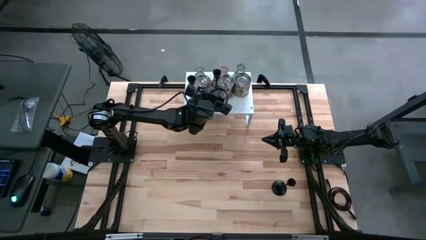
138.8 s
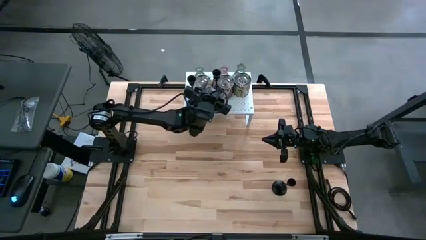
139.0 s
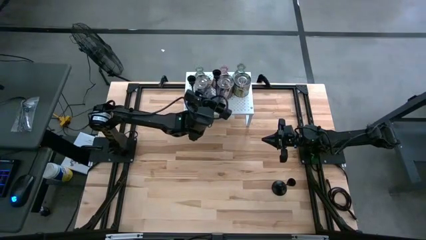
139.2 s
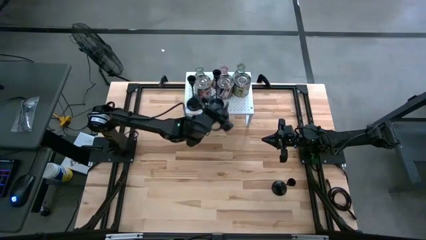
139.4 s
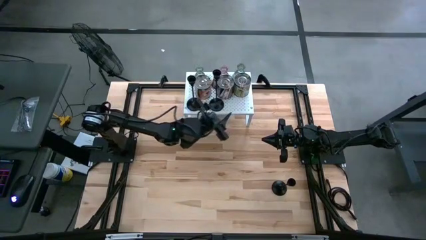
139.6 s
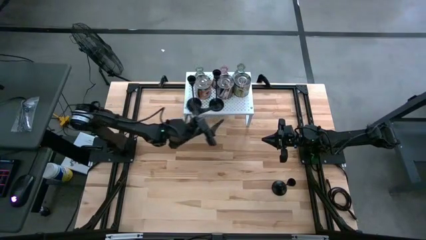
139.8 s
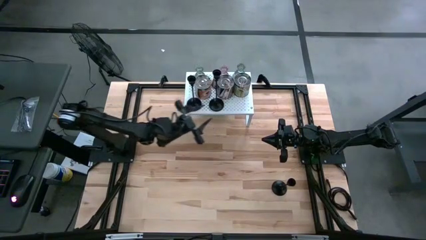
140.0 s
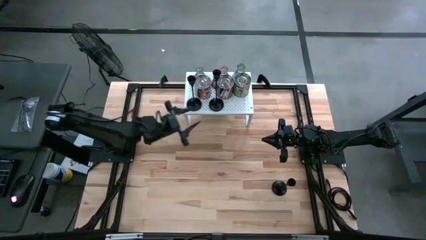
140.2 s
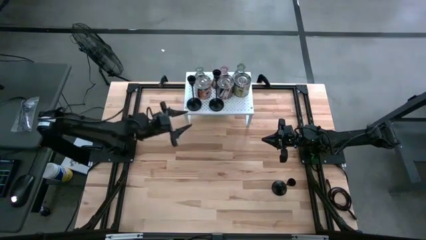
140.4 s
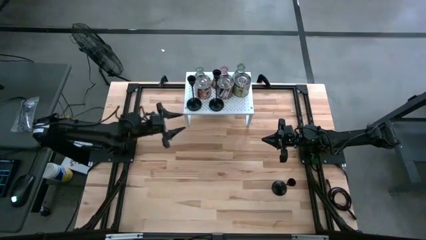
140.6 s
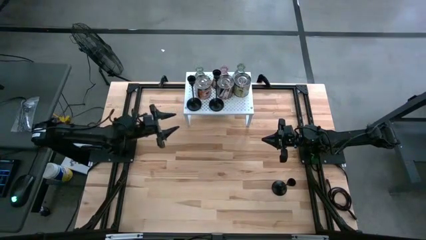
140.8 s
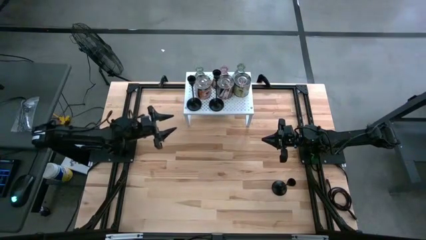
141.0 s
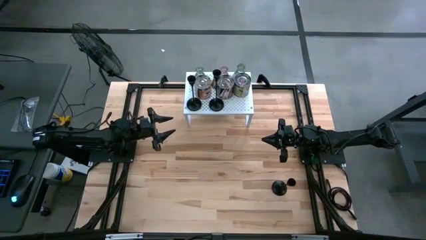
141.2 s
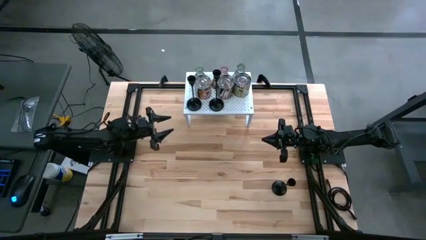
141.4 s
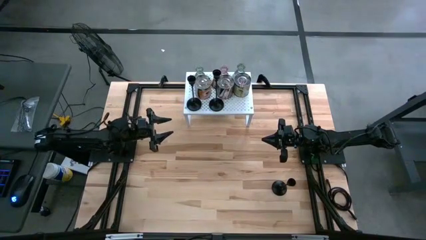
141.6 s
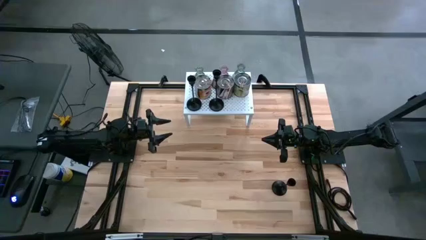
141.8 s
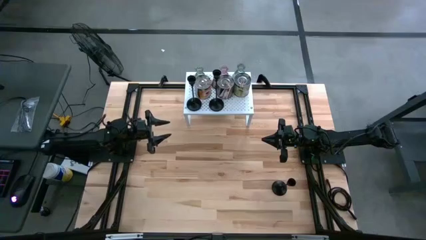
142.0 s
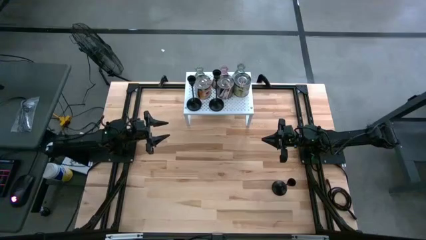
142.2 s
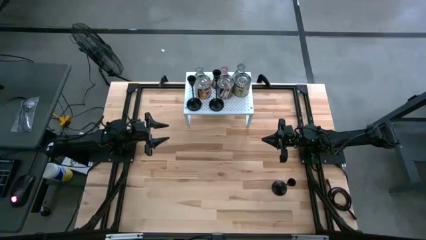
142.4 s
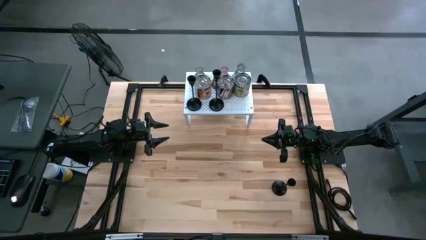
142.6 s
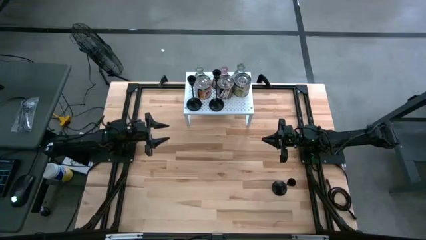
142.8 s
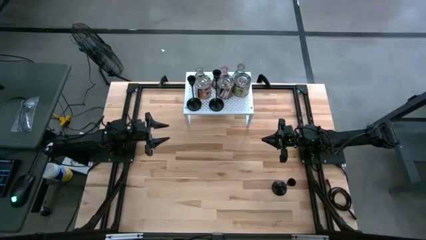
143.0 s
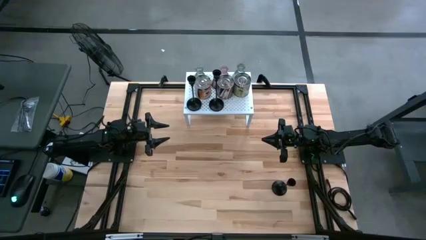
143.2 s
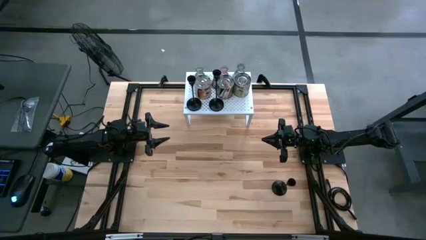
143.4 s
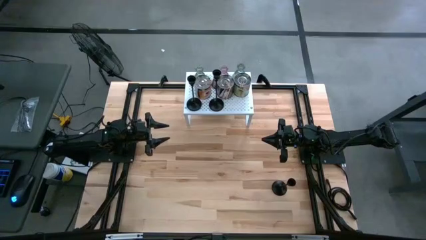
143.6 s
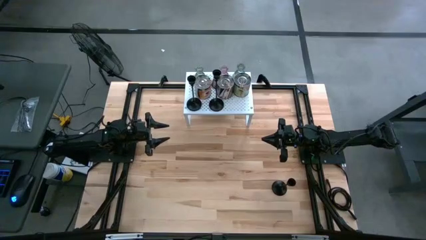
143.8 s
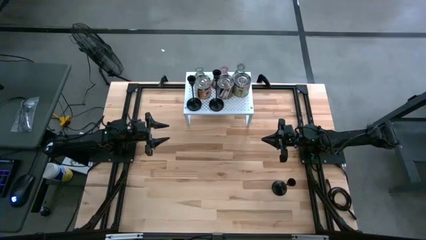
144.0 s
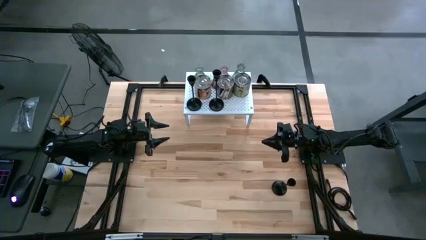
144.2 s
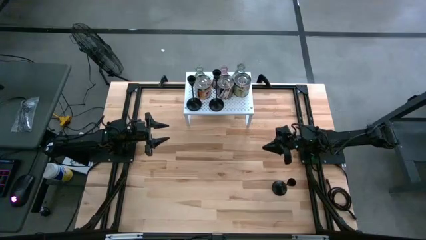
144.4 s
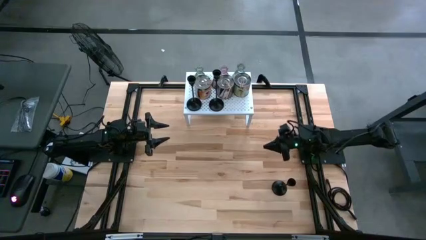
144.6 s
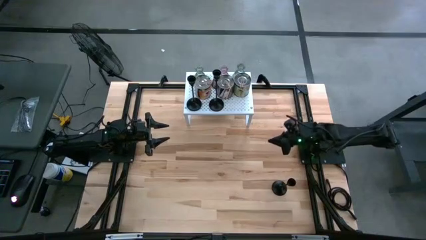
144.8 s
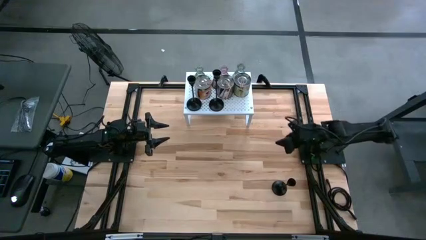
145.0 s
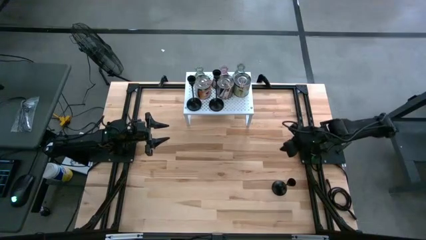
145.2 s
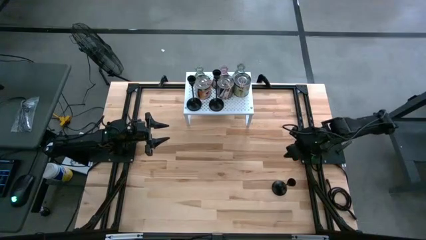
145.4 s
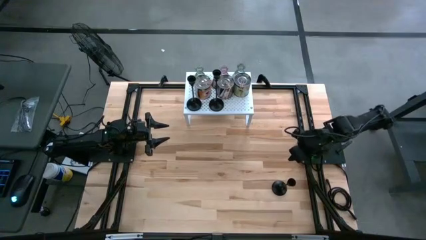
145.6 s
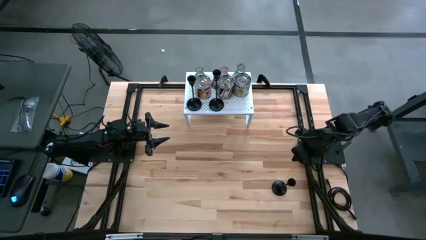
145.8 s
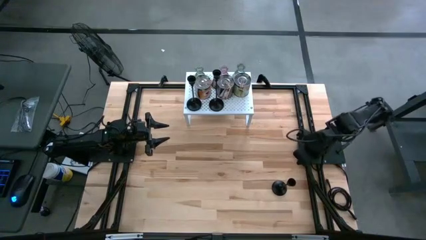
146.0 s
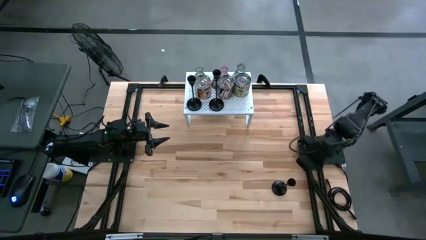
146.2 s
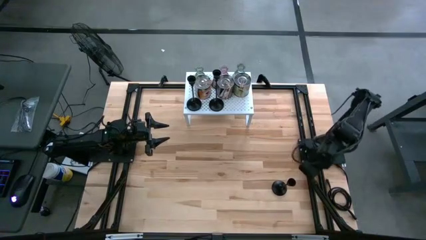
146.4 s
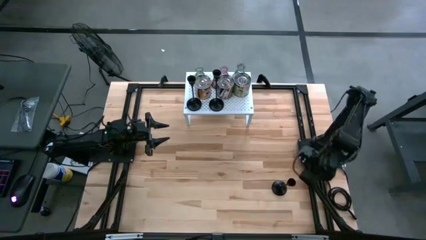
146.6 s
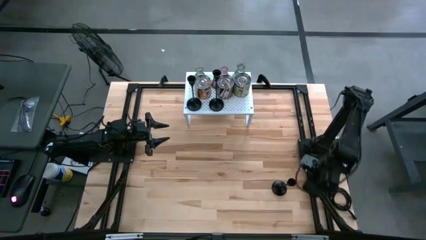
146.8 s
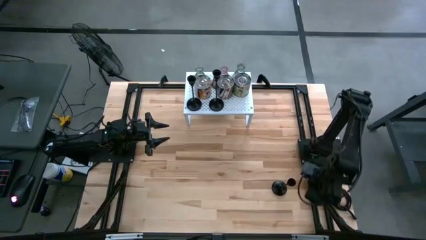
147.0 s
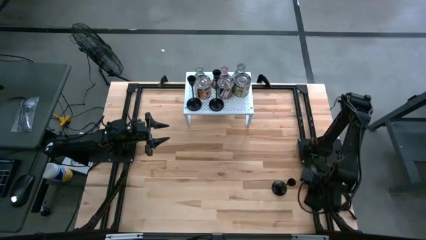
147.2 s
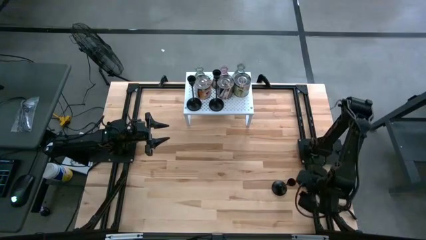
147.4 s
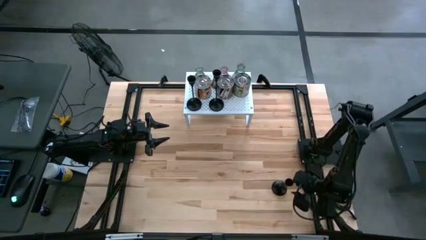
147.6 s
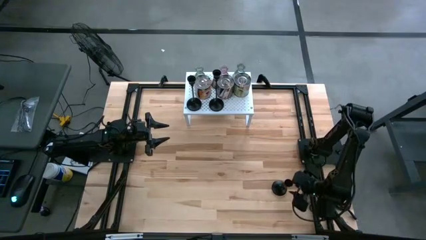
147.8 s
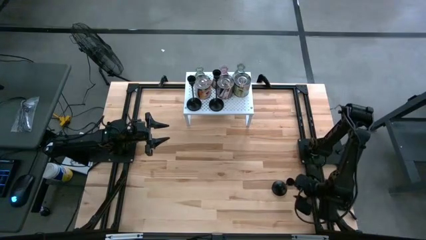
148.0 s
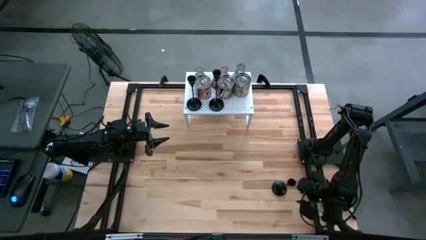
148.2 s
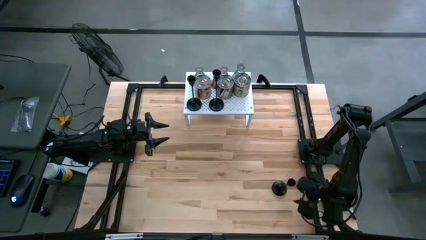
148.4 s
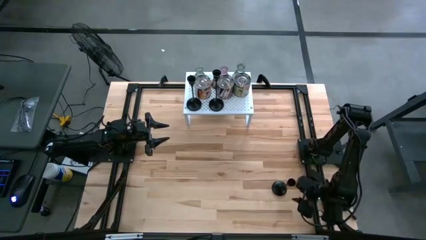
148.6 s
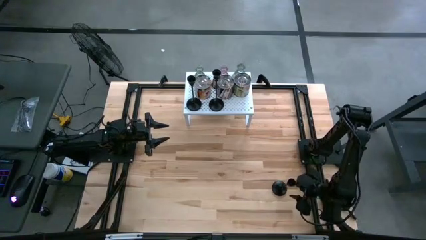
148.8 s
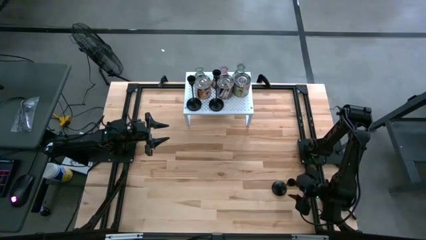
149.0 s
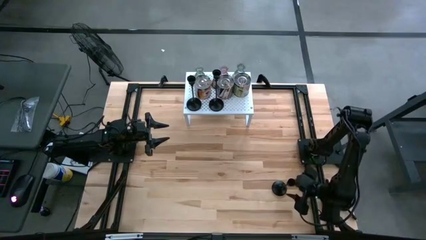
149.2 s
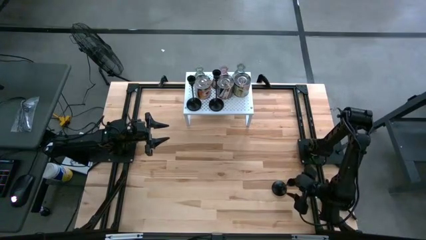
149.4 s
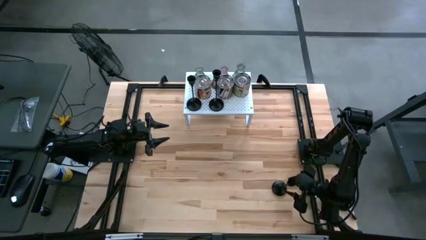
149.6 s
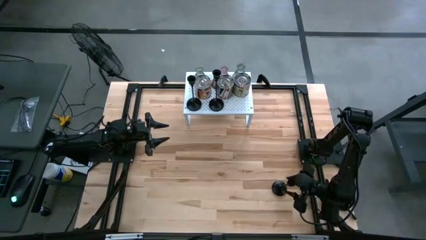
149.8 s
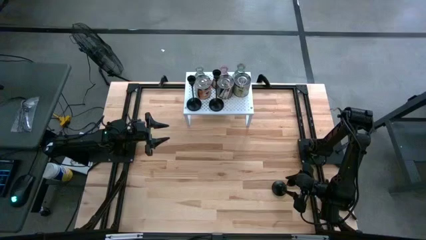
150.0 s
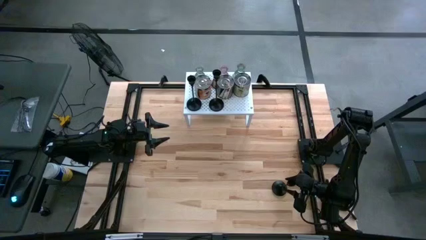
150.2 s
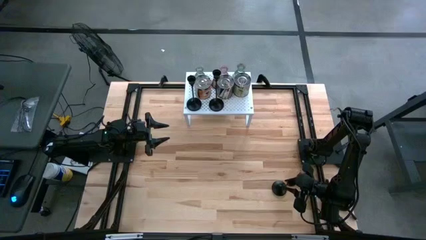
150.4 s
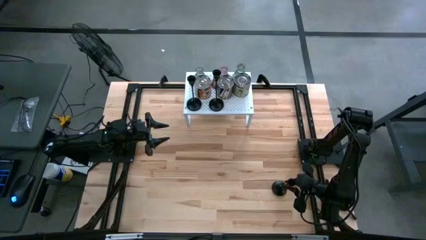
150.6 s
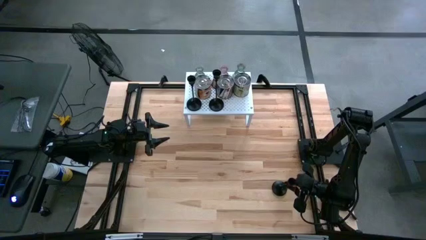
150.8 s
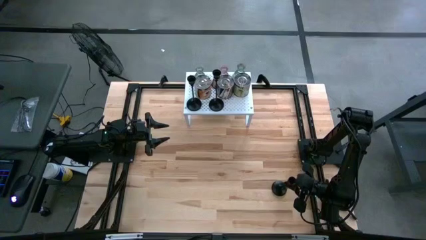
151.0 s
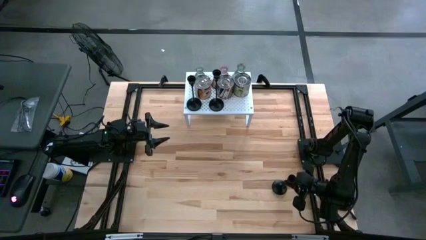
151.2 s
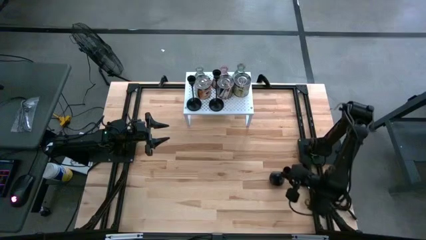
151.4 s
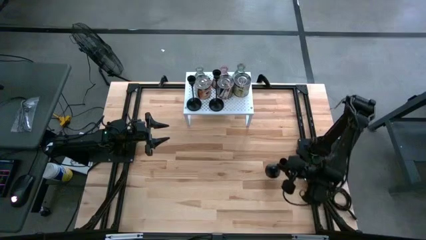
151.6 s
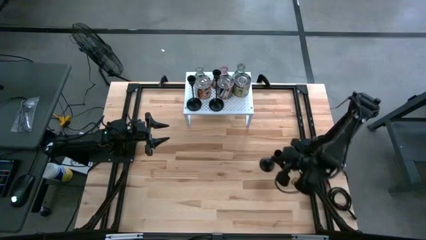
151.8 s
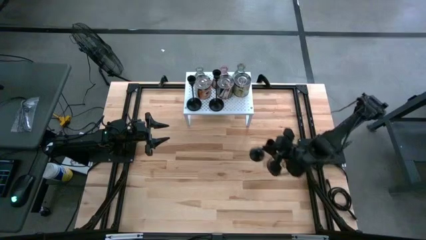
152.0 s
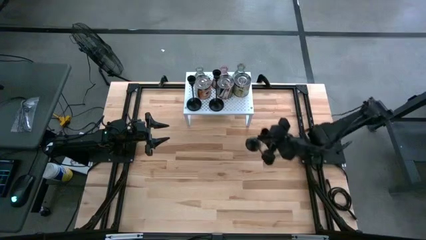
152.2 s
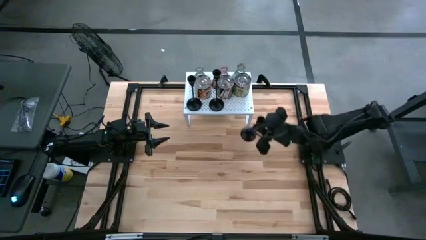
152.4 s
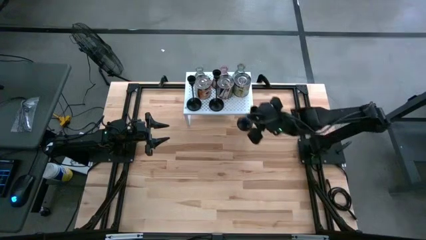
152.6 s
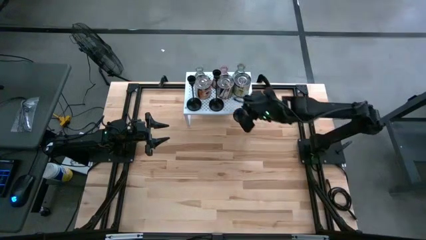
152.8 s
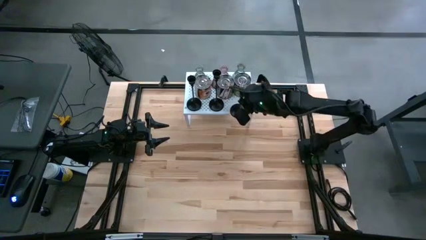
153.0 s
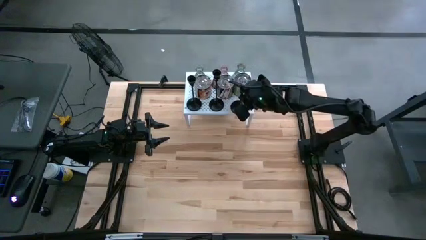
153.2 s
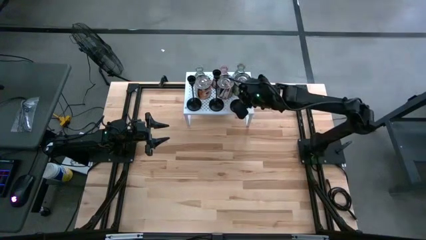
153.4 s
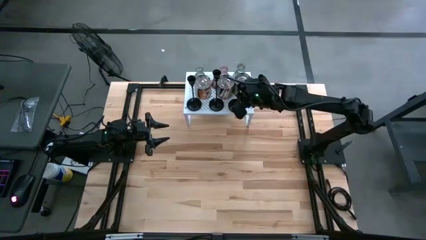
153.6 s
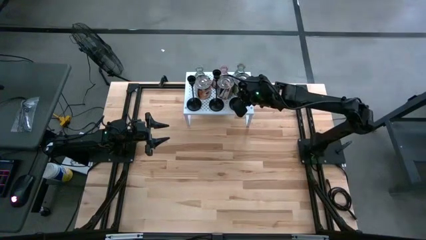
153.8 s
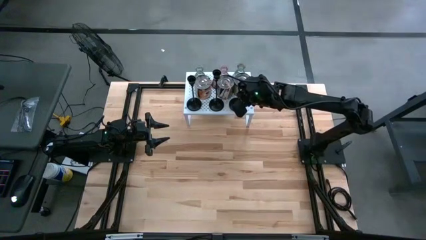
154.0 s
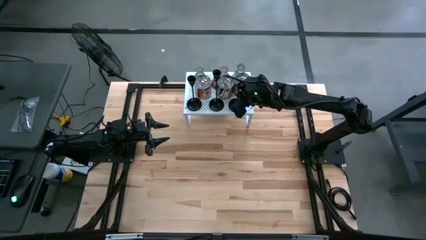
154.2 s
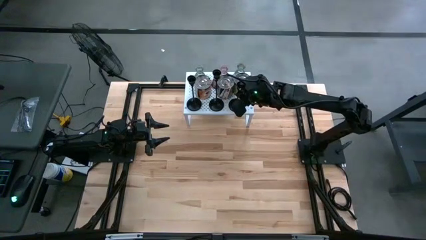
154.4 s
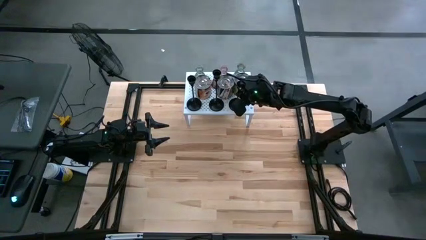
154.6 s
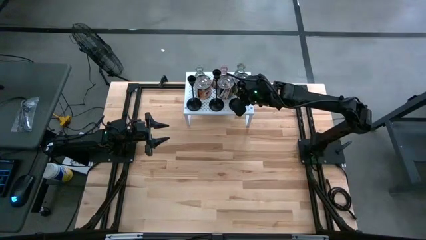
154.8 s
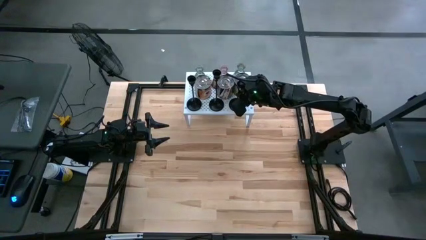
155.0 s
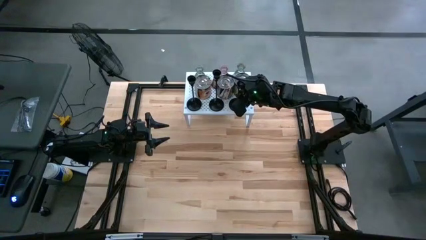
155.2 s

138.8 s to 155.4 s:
Task: Pick & Place candle stick holders
Put the black candle holder on the shelf aligned with the other candle holders
